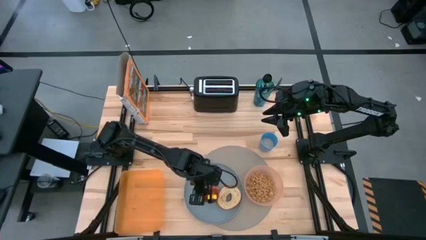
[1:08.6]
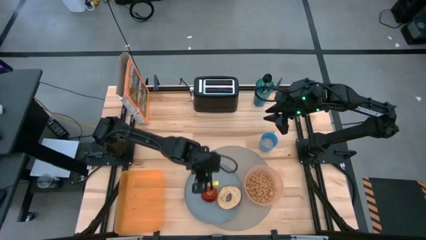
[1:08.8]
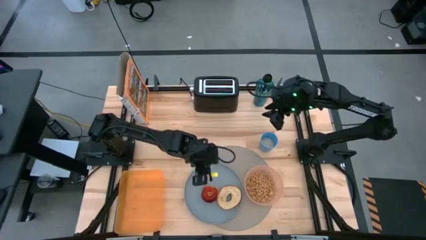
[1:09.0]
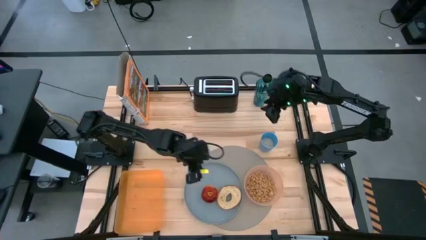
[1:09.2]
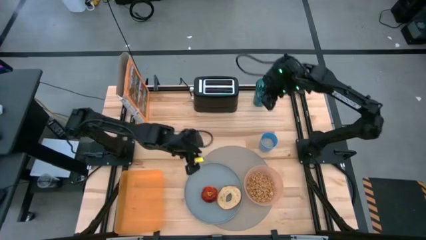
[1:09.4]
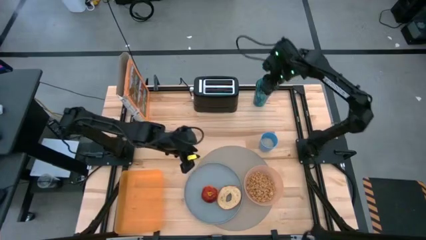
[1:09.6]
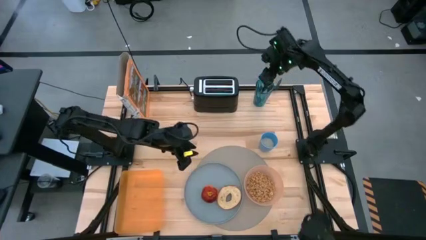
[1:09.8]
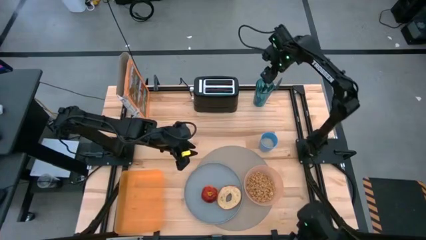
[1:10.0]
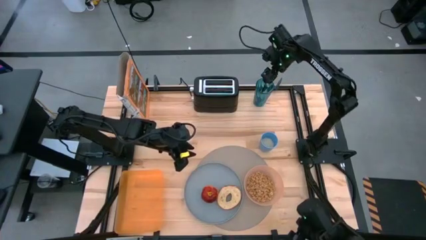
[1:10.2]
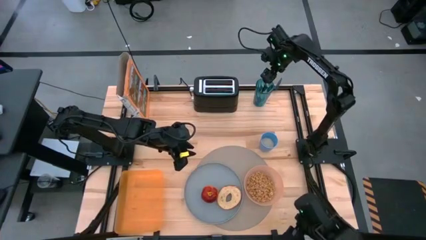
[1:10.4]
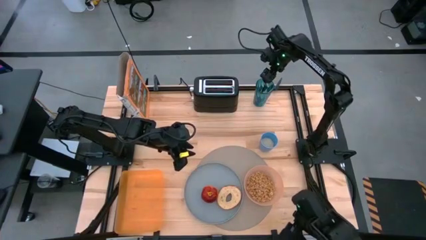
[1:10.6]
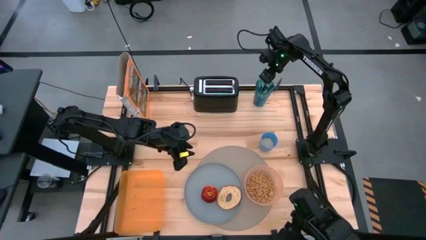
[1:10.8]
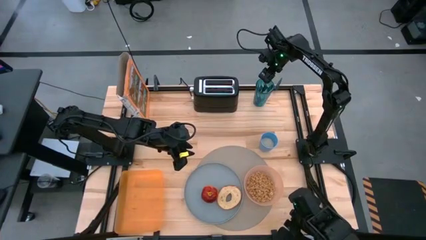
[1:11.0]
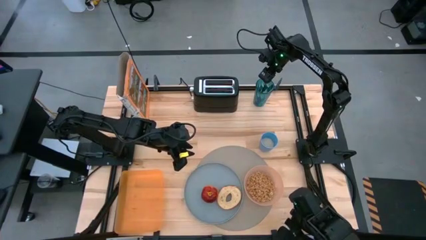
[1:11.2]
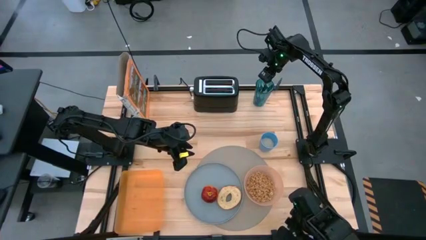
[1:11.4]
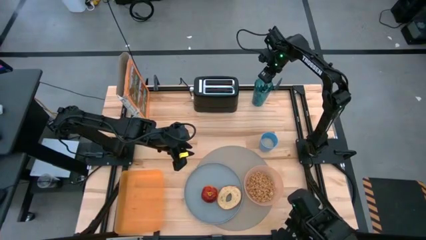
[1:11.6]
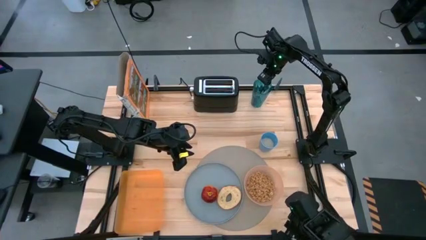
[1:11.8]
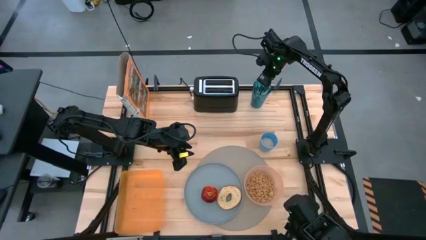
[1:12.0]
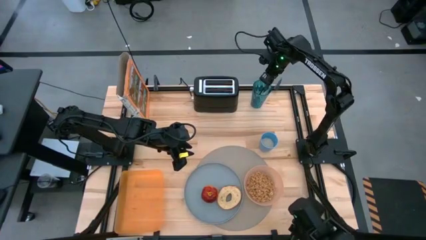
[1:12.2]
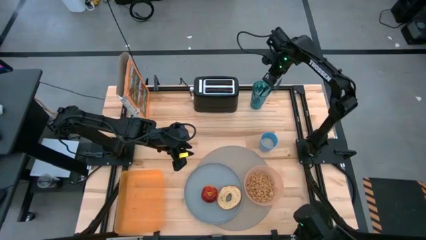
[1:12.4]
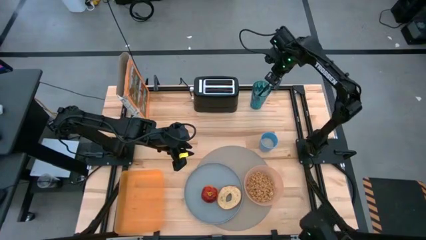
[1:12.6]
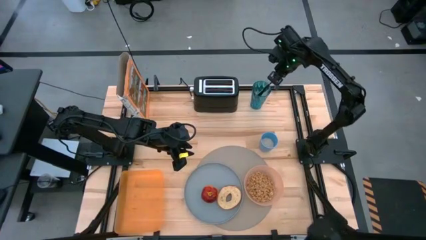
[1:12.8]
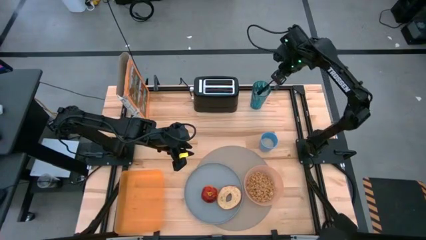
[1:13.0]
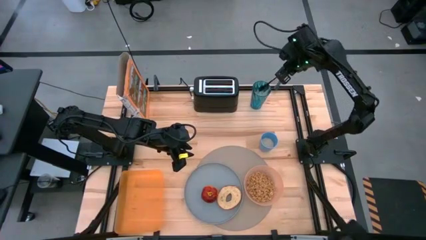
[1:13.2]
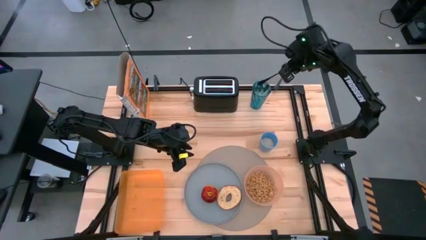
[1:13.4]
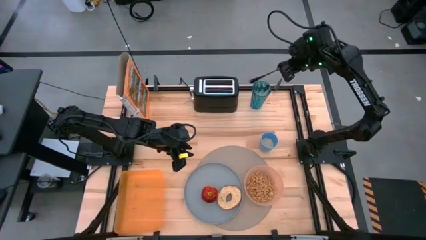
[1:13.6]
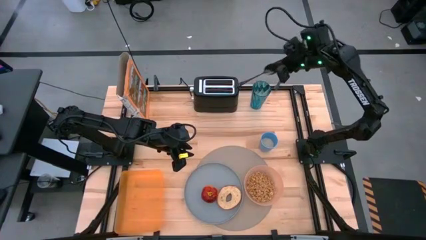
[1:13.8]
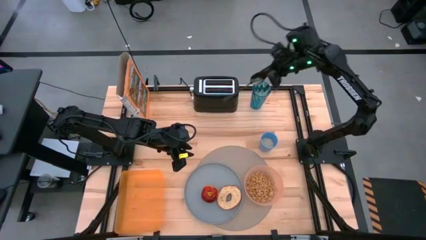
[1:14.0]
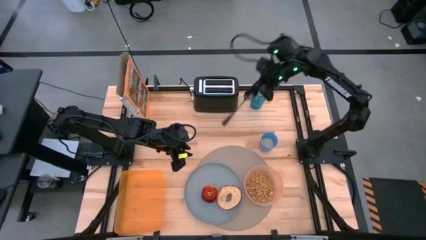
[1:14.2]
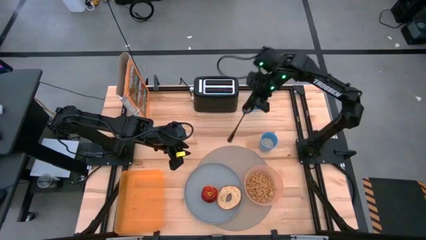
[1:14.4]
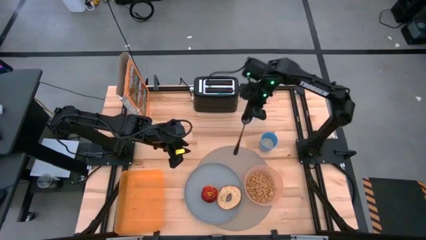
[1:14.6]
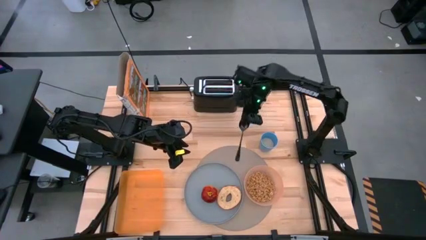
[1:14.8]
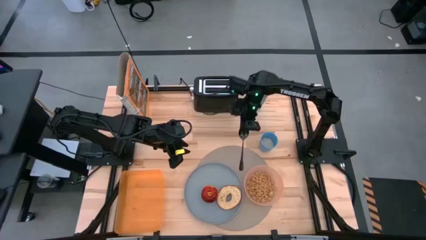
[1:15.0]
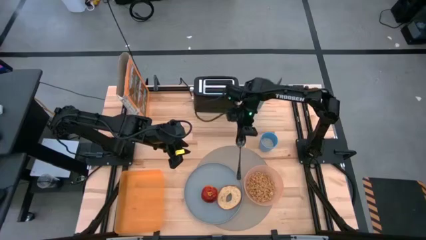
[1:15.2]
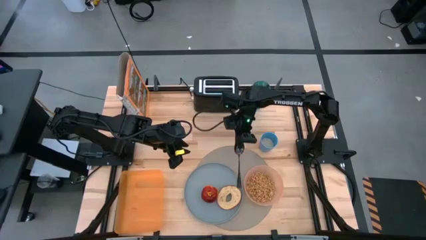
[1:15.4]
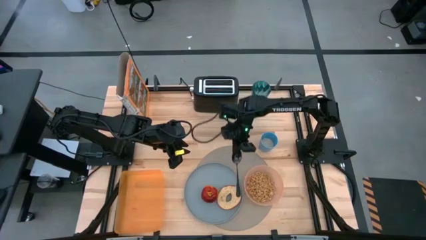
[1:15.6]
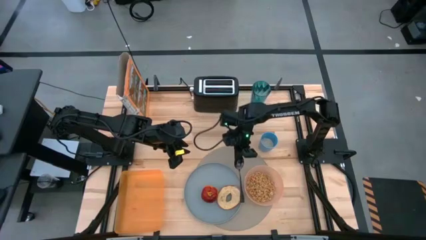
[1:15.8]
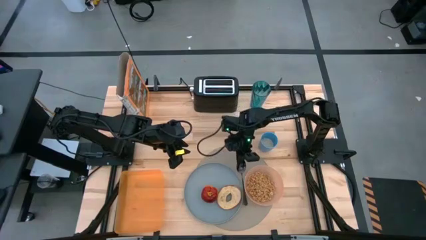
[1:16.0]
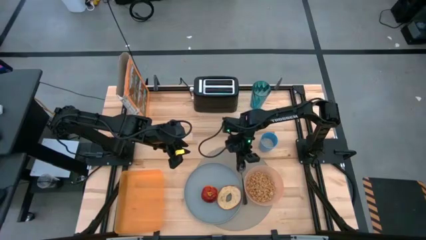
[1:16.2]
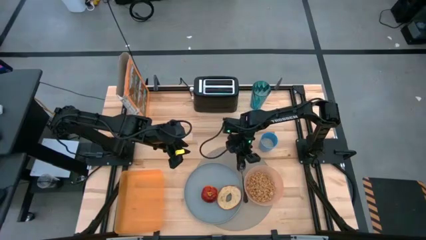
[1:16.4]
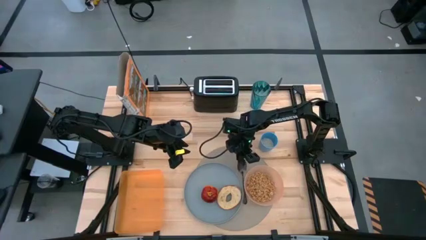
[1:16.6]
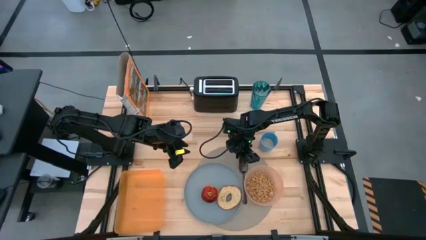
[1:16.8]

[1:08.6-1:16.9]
Task: Arrange a breakfast setting
Put the black spoon in the center of the gray placemat

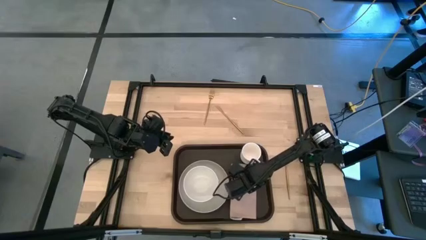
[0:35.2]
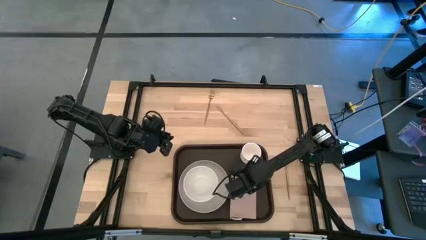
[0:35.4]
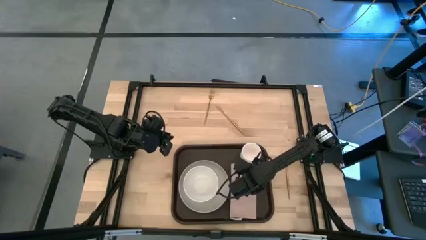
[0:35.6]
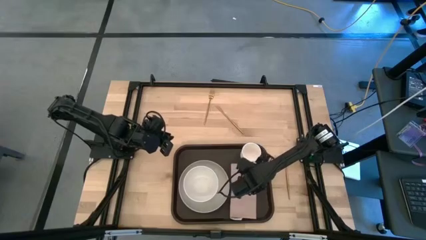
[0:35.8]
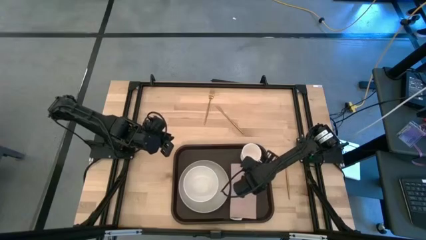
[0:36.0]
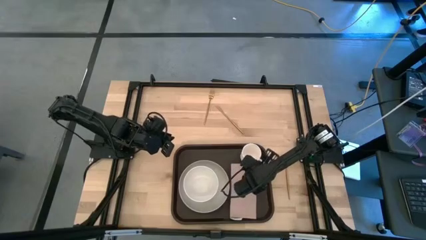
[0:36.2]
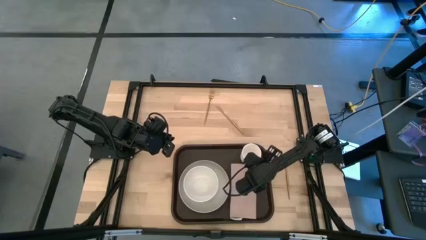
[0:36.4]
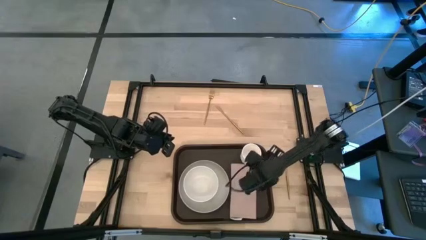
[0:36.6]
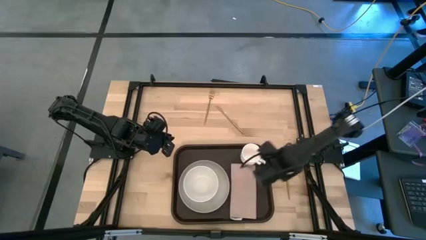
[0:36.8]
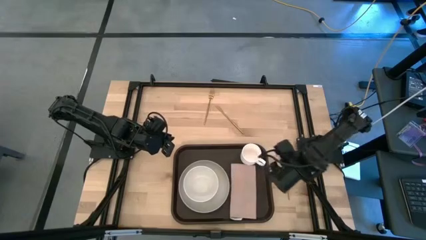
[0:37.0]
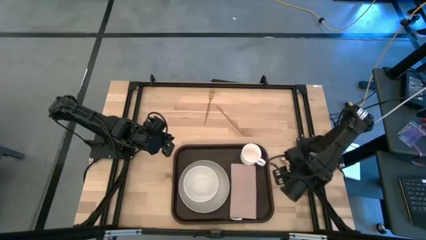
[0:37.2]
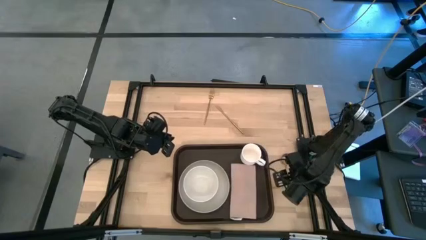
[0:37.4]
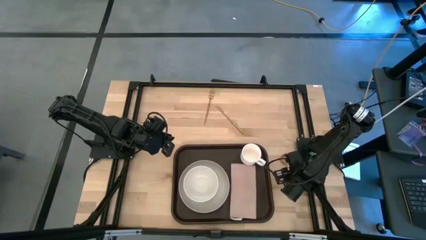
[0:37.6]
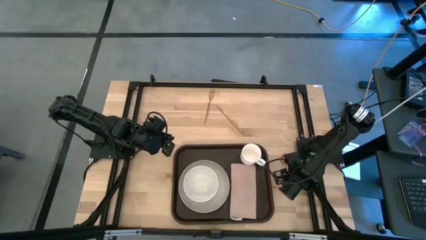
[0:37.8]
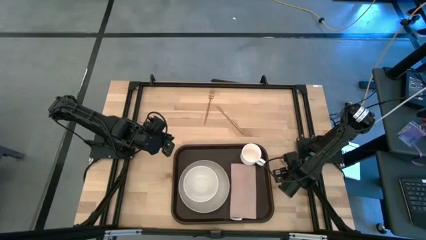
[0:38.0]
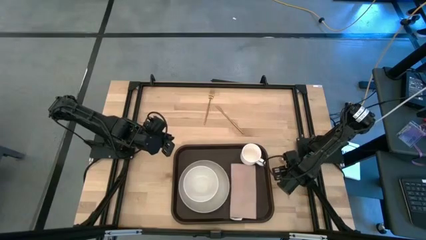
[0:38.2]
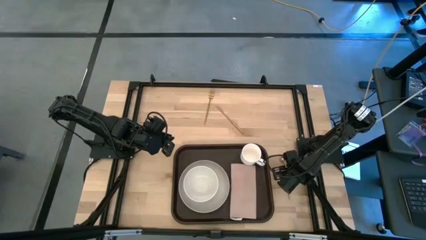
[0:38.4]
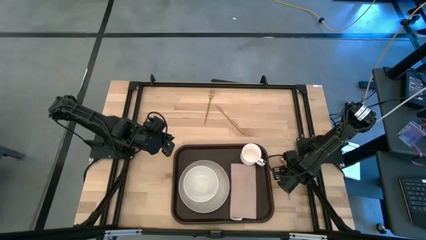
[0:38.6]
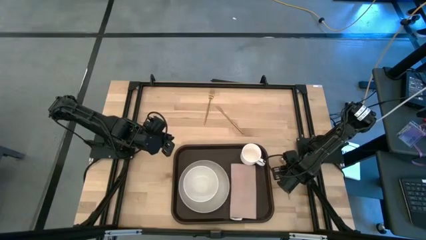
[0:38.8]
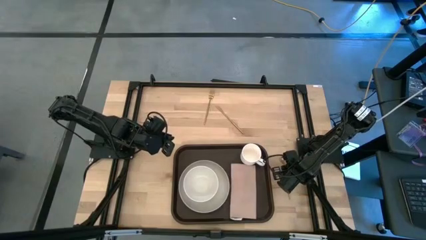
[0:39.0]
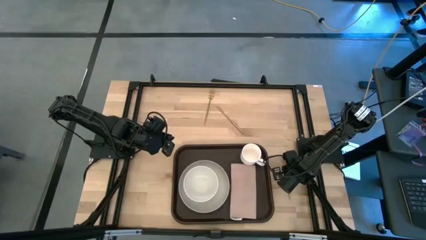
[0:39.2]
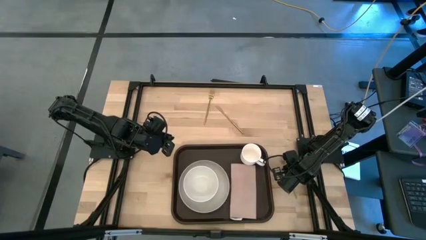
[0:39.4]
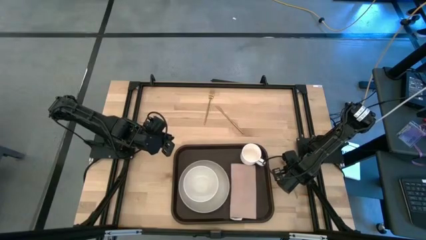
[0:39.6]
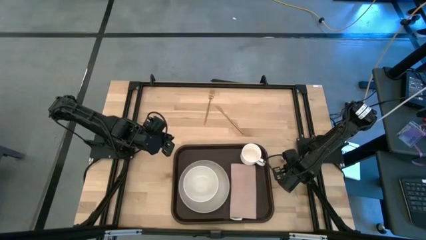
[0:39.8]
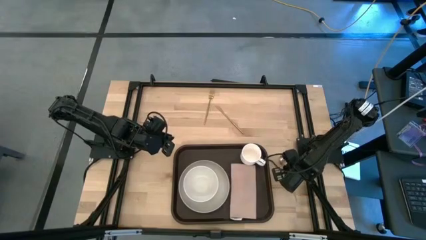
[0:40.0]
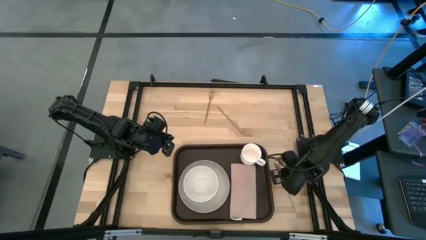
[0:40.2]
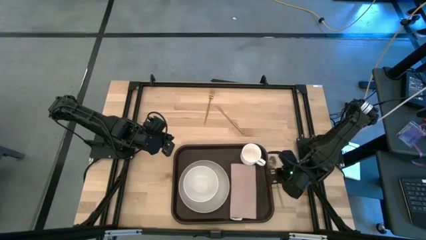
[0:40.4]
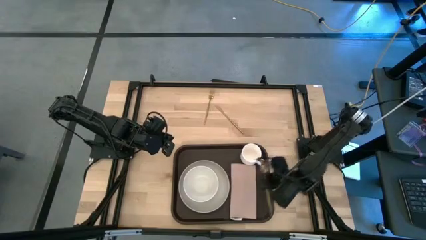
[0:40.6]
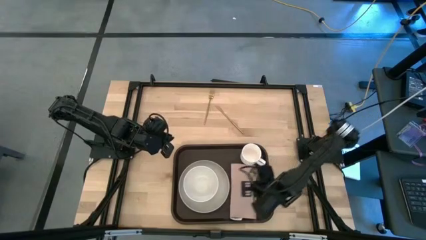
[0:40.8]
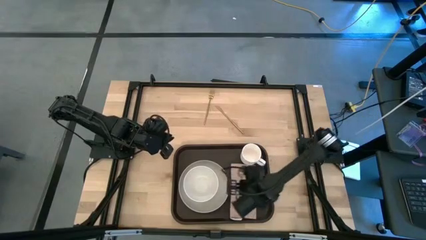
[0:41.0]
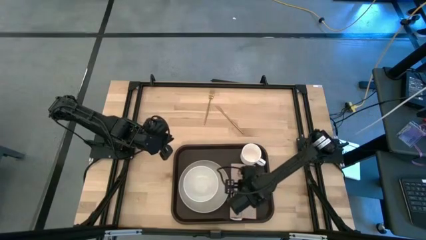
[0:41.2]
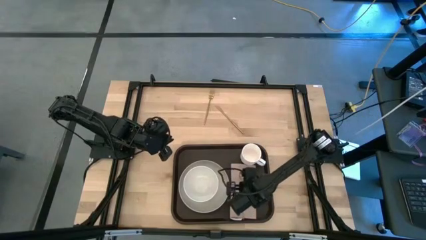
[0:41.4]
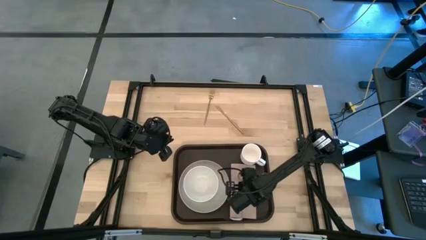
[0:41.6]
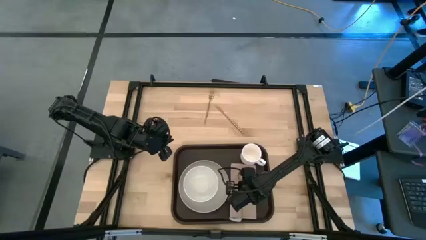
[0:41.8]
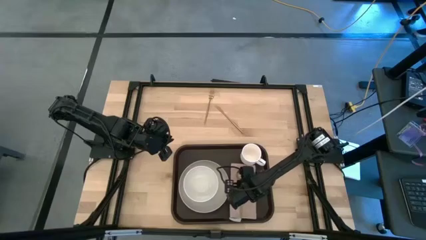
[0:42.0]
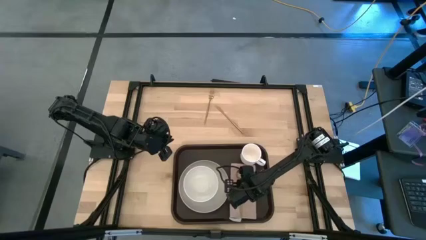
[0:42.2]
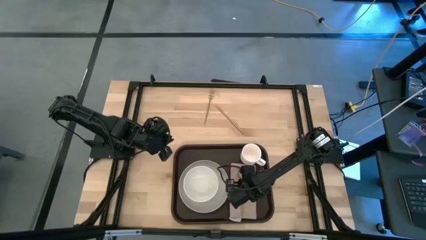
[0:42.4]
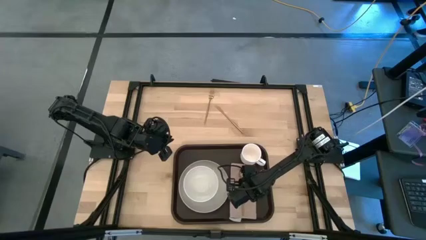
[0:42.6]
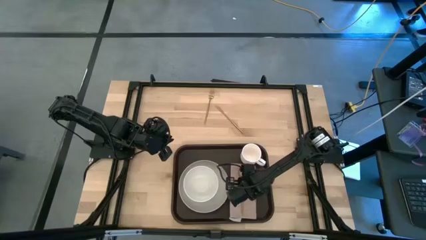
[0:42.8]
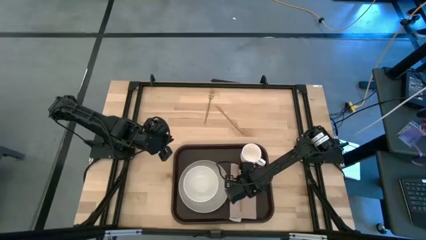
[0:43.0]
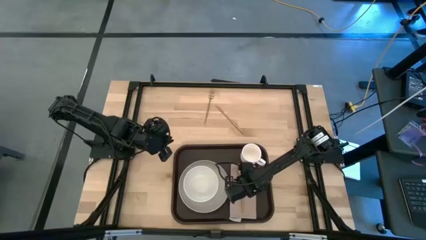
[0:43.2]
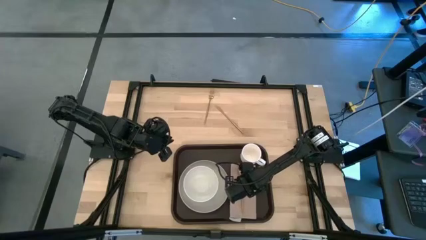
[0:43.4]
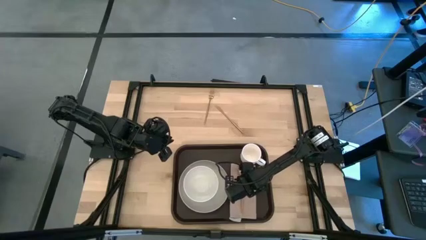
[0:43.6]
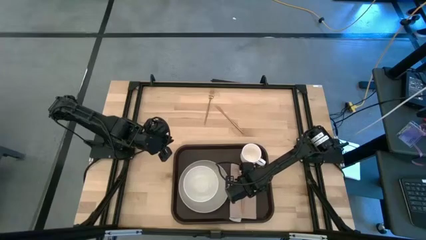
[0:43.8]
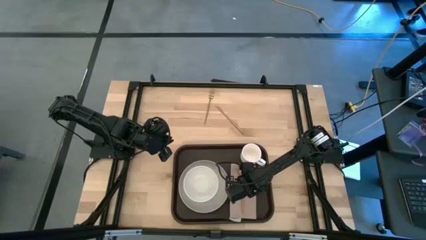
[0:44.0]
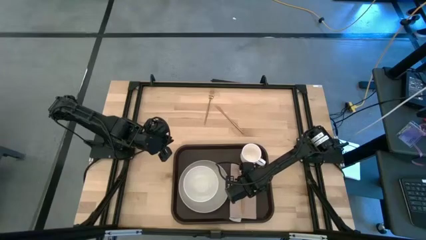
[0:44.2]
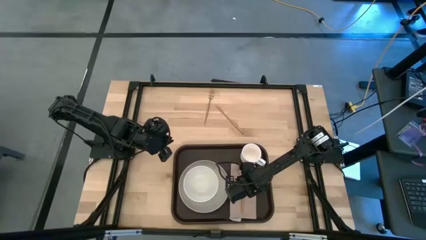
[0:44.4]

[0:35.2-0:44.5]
Task: Set up tray
Put the gold spoon on the brown napkin to the right of the gray plate
